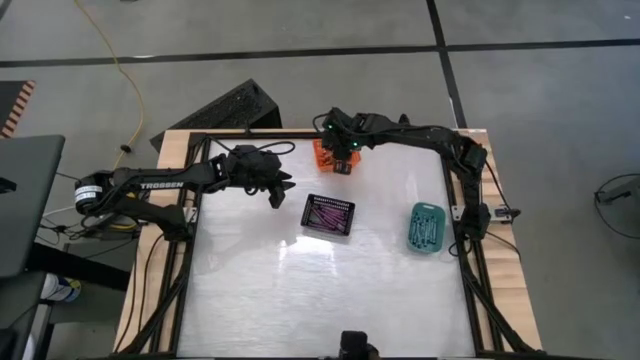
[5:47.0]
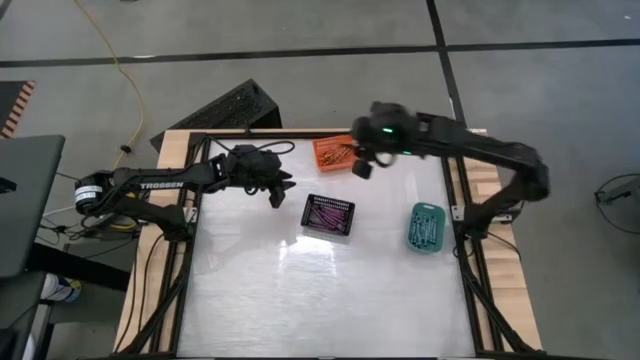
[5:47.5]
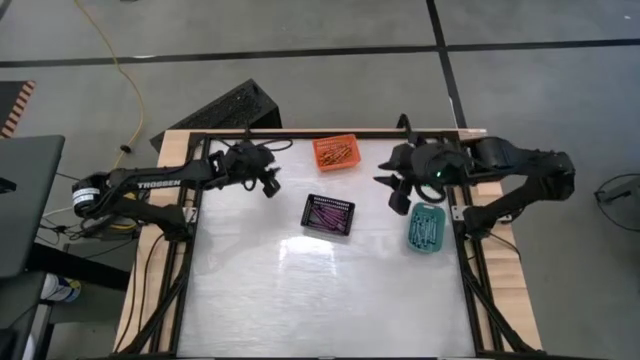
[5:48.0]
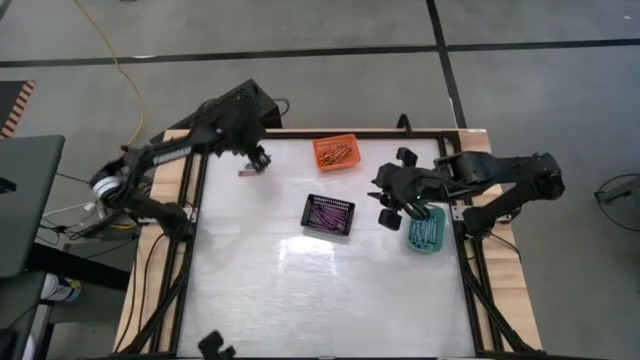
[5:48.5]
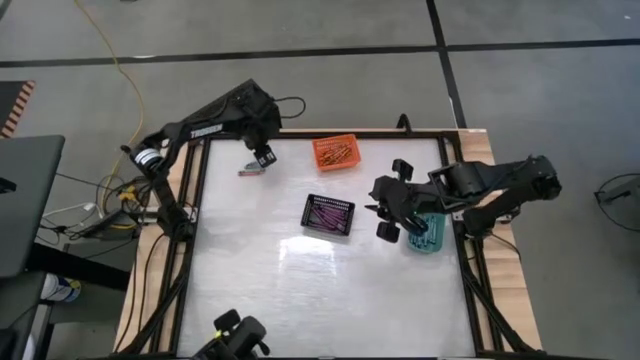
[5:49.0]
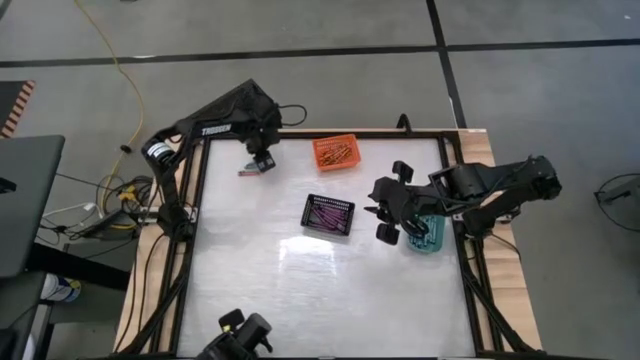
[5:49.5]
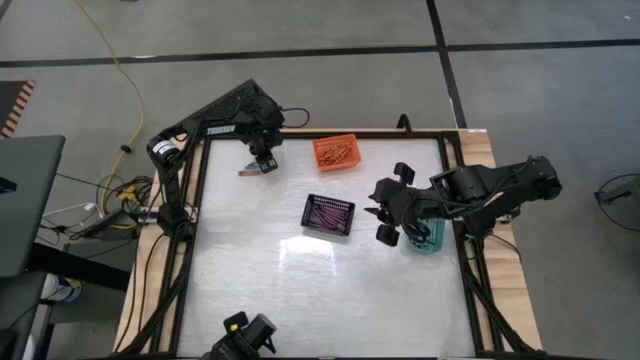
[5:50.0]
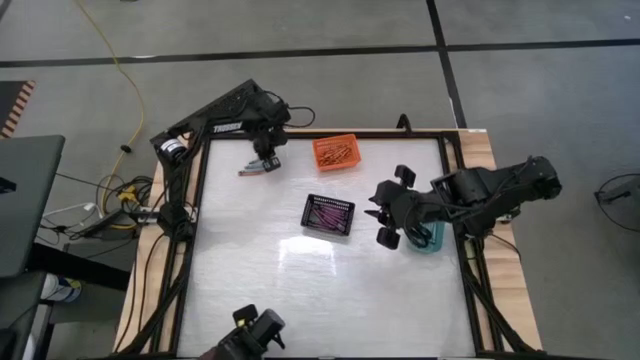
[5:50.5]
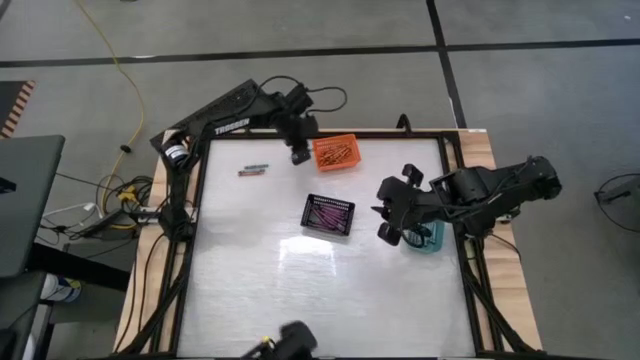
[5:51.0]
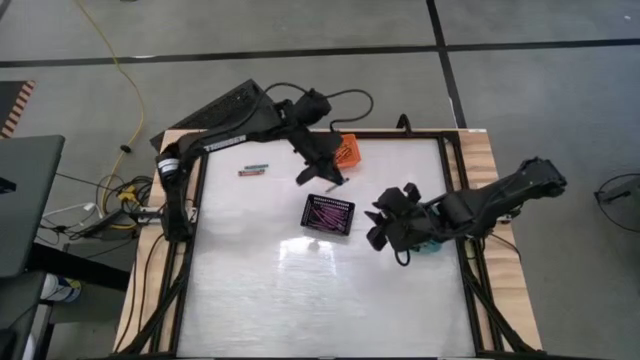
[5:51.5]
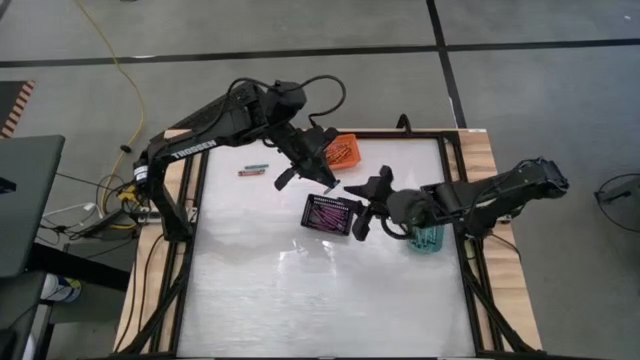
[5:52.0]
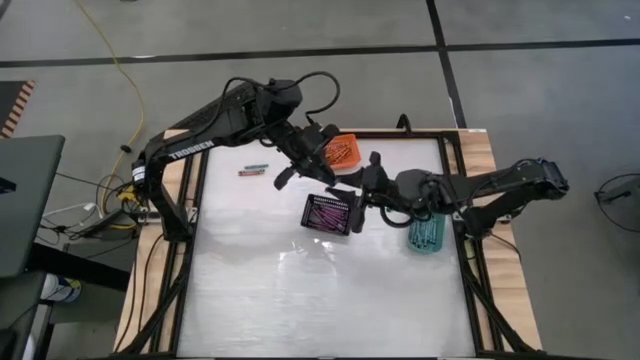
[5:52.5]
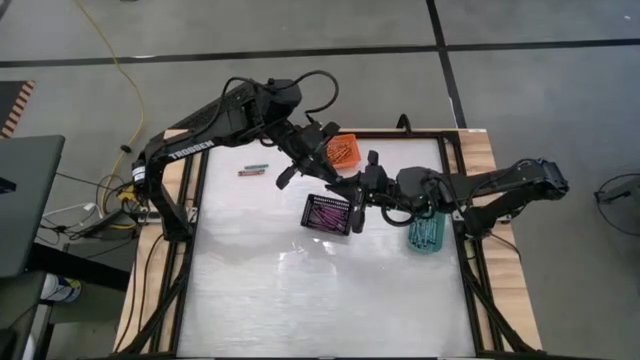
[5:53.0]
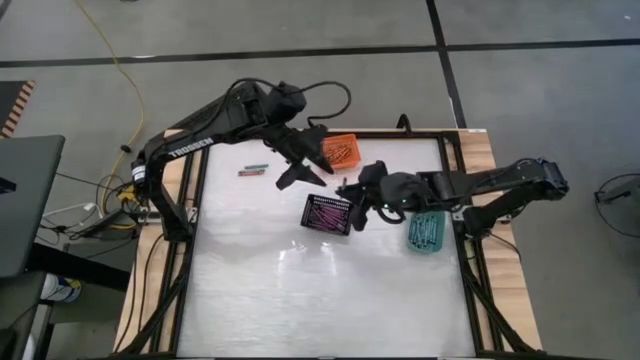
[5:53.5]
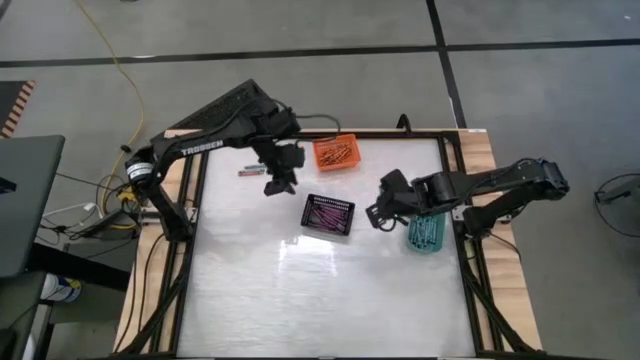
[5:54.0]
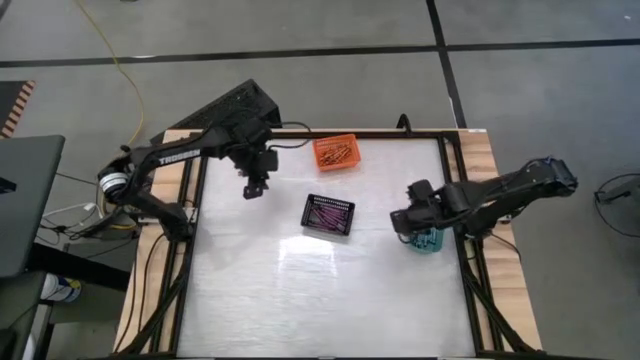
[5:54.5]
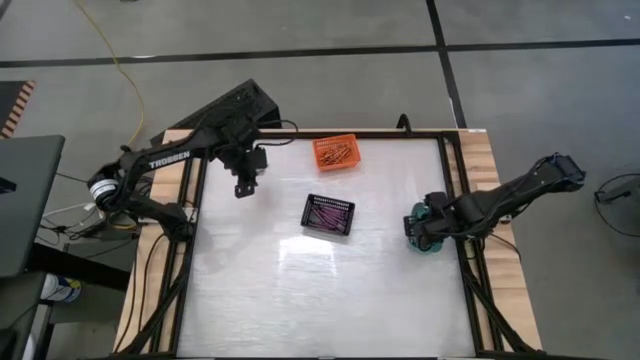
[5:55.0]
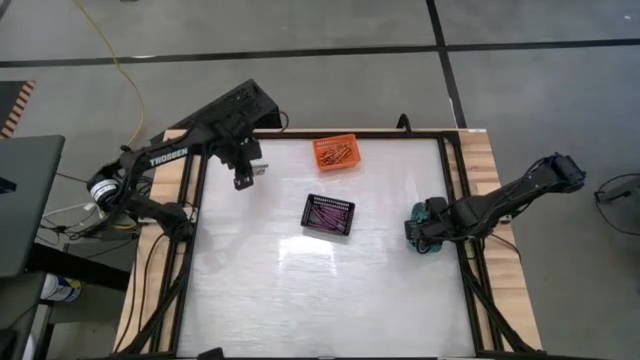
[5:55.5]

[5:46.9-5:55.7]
Task: Sort crayons
Put the blue green crayon into the green bin

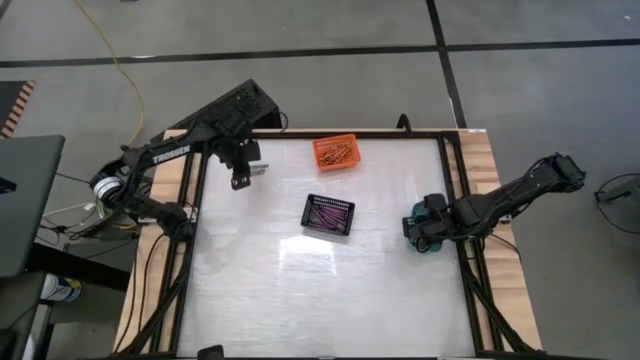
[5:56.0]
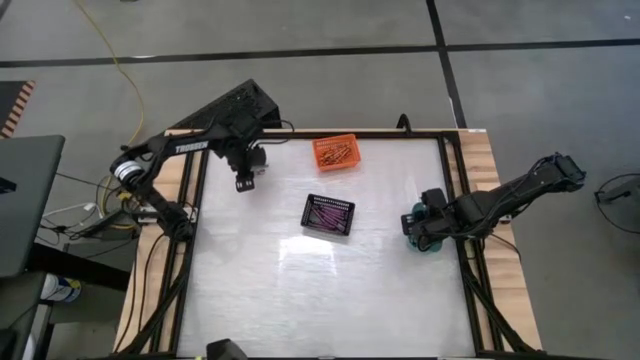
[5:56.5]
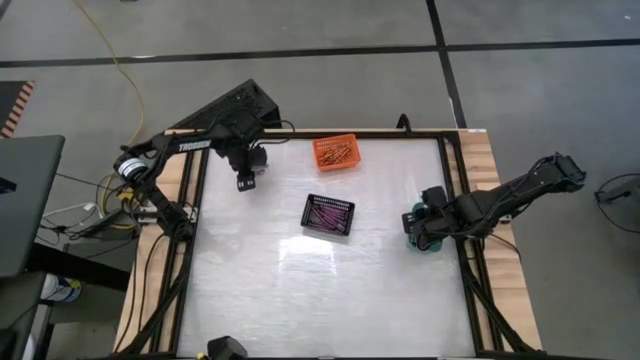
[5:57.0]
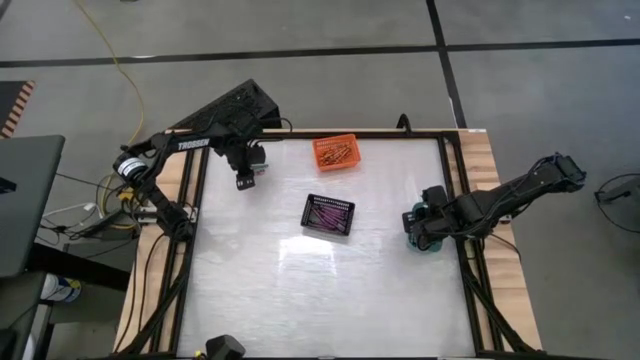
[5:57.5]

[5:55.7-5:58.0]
Put the orange crayon into the orange bin

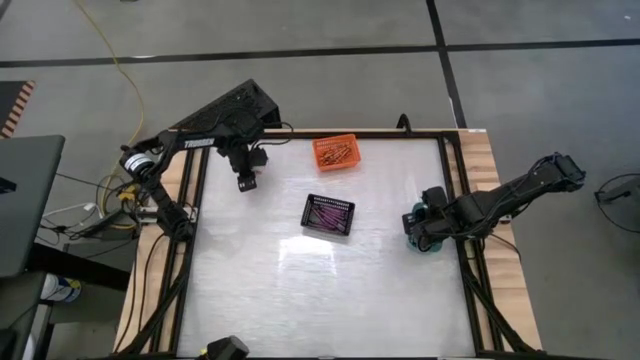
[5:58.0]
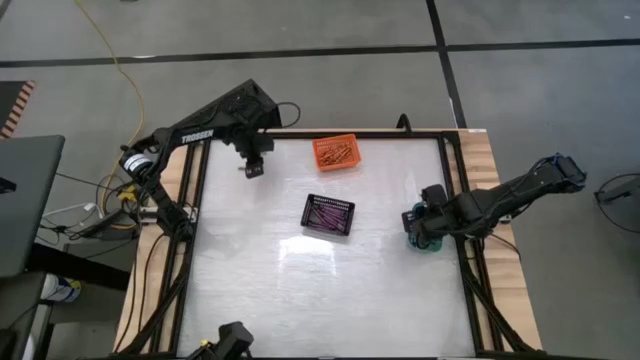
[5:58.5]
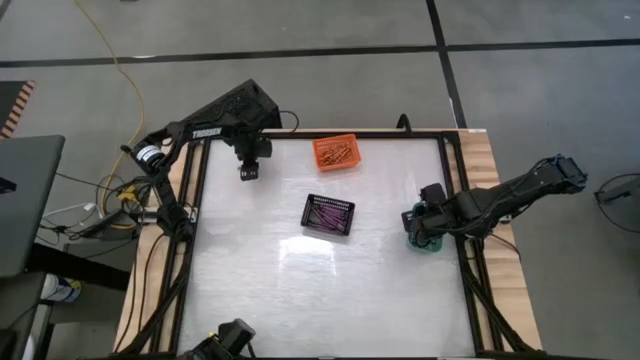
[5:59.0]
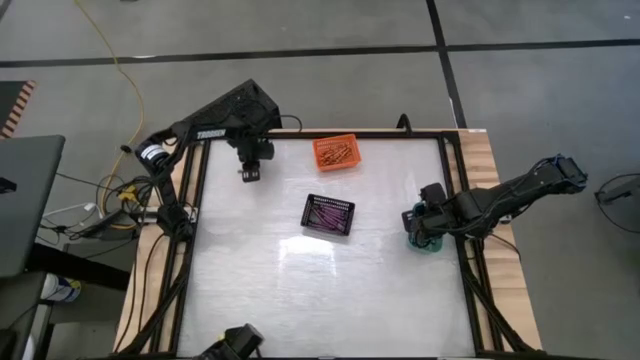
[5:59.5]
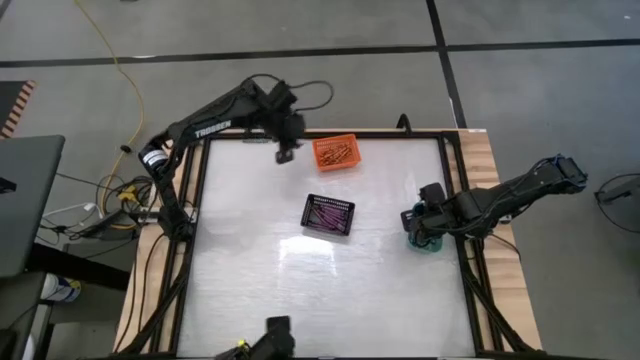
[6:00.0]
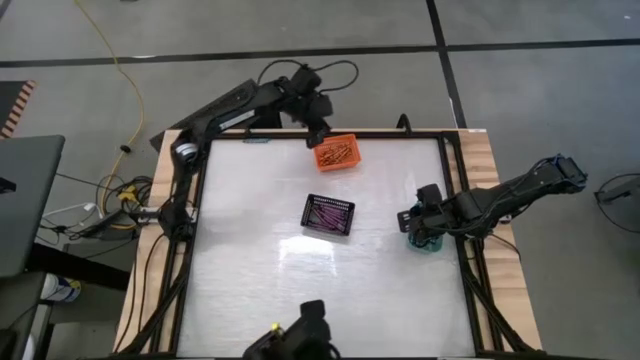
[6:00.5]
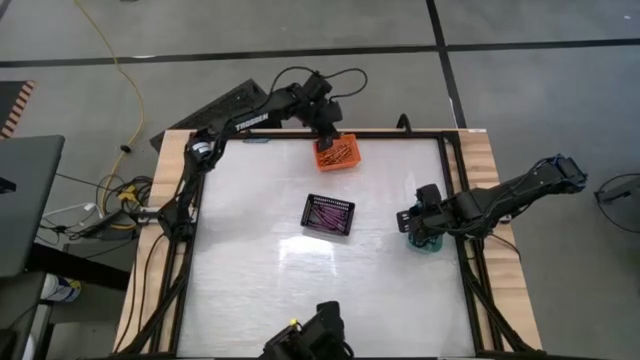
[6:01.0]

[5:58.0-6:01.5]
Put the orange crayon into the orange bin

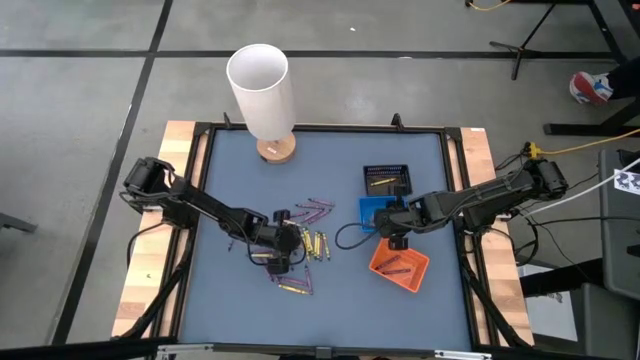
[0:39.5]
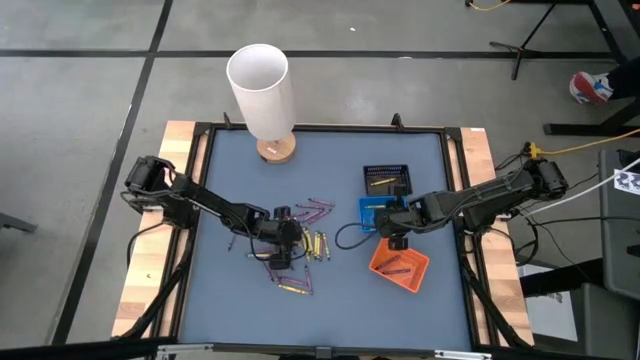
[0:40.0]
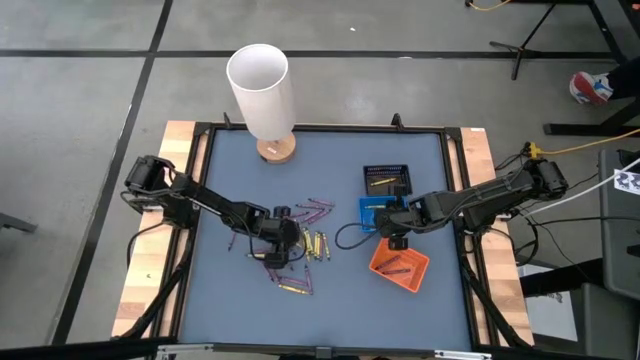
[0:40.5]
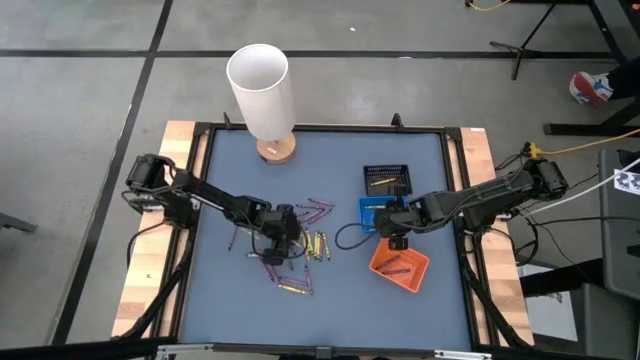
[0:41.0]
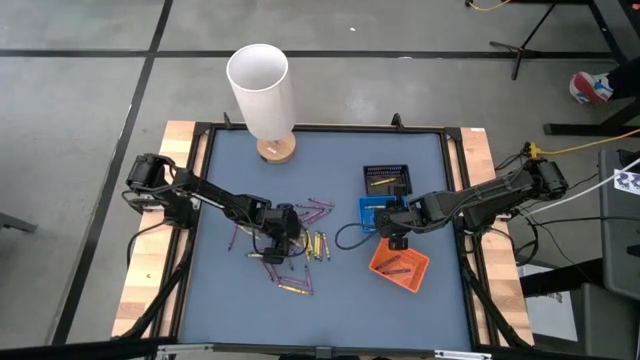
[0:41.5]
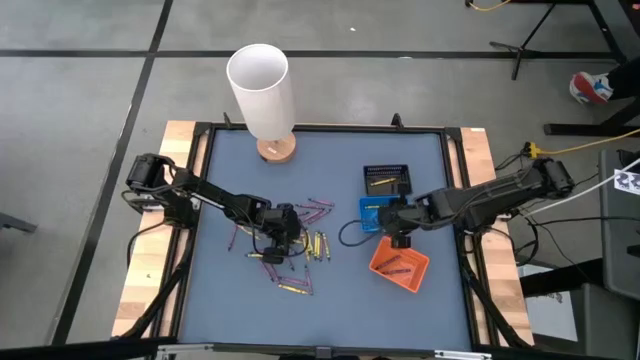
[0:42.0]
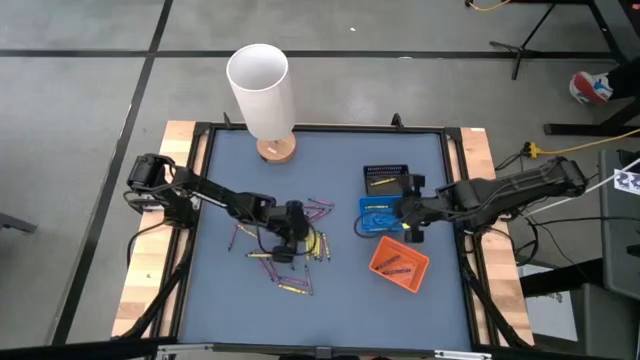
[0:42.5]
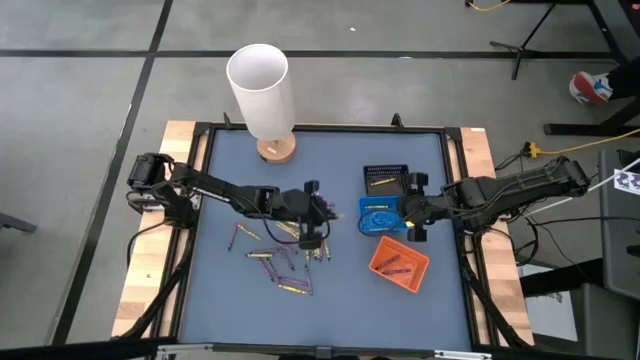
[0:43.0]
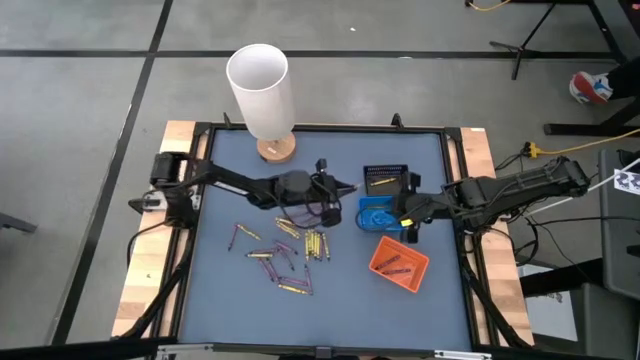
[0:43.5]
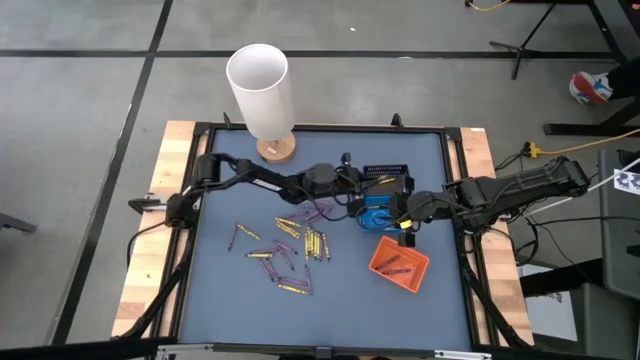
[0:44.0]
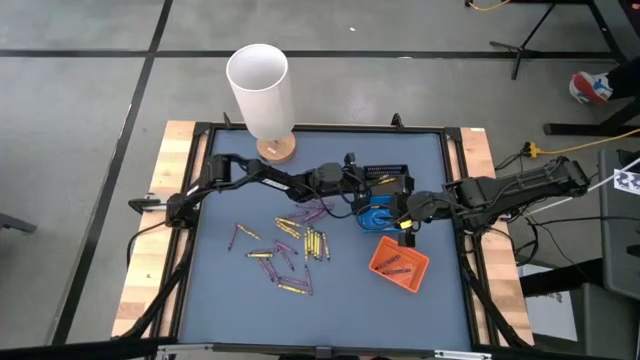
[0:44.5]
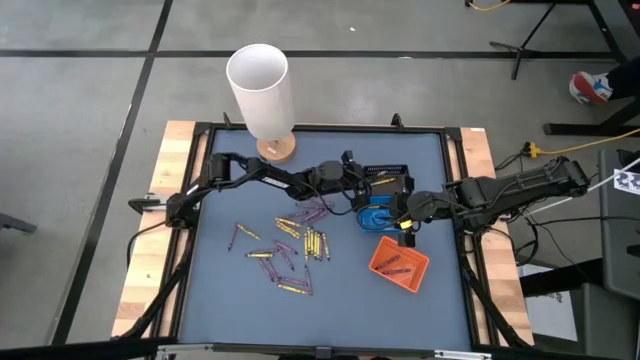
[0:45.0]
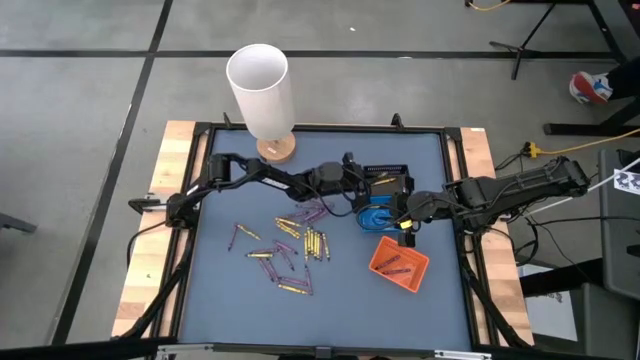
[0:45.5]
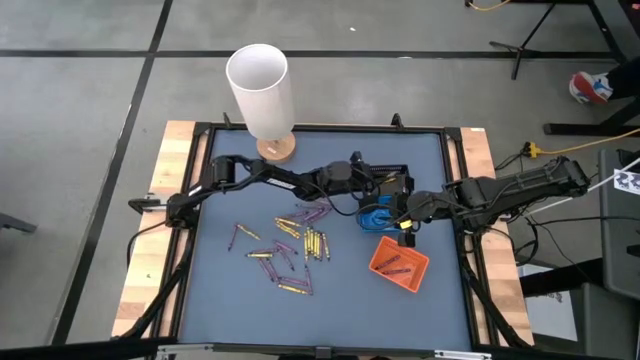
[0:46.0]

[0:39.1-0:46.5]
Task: Sort crayons
Put the yellow crayon into the black bin
